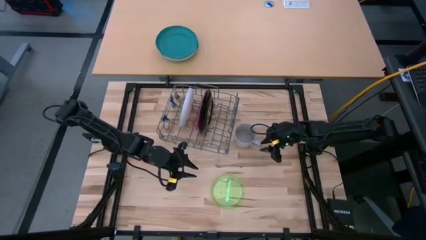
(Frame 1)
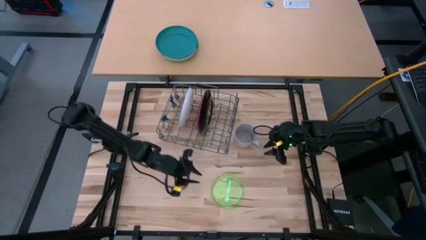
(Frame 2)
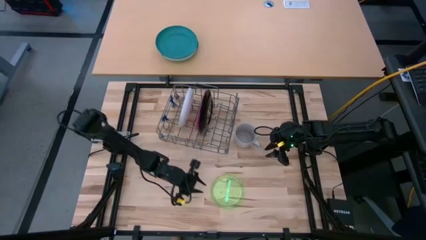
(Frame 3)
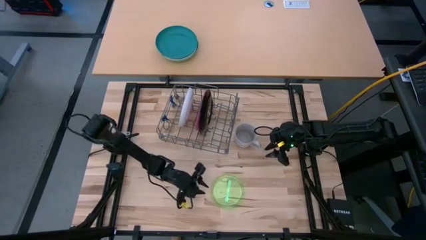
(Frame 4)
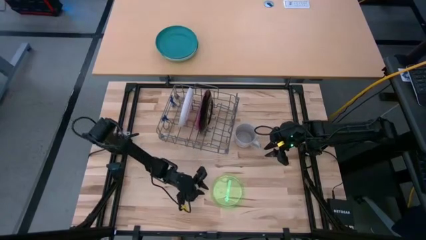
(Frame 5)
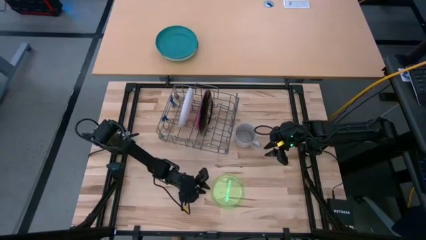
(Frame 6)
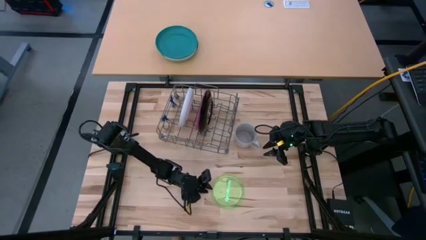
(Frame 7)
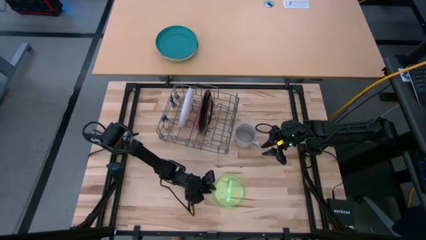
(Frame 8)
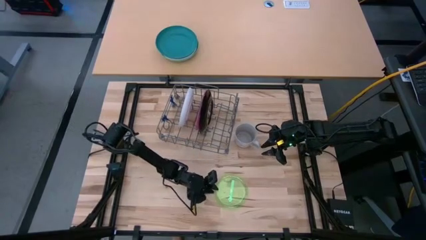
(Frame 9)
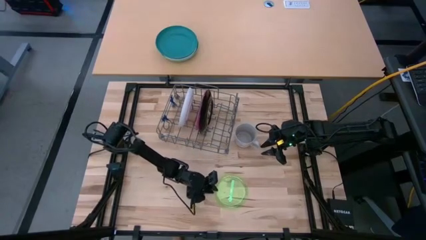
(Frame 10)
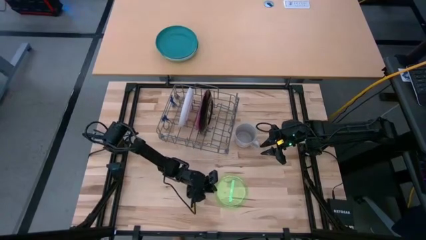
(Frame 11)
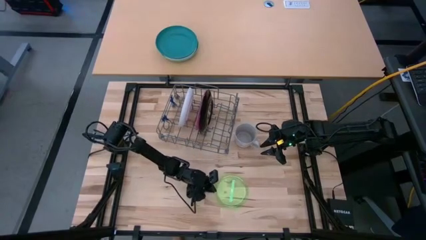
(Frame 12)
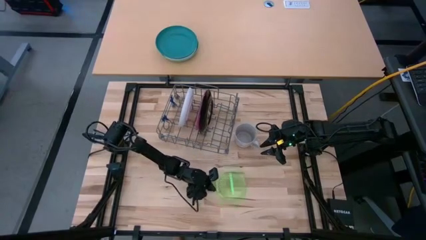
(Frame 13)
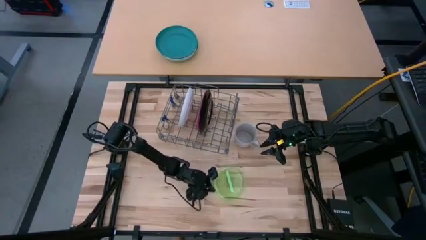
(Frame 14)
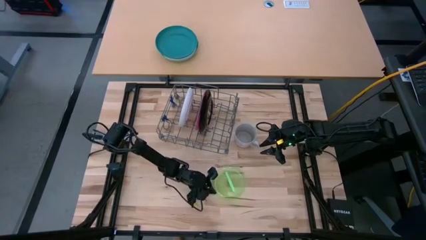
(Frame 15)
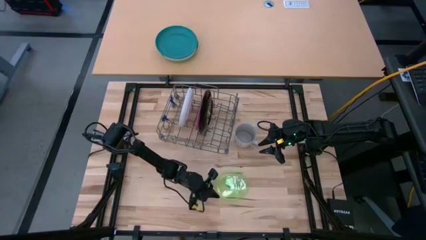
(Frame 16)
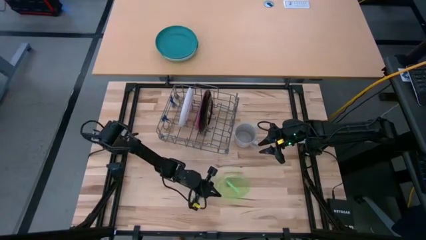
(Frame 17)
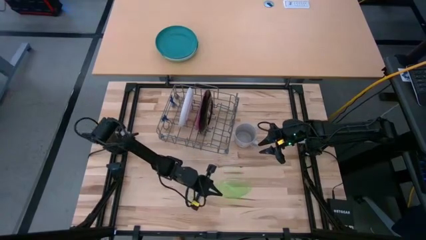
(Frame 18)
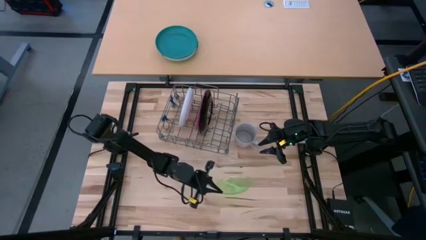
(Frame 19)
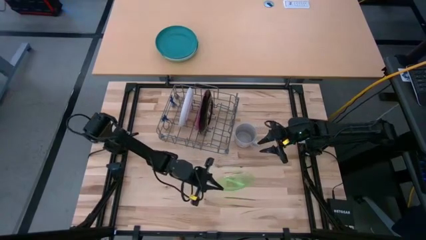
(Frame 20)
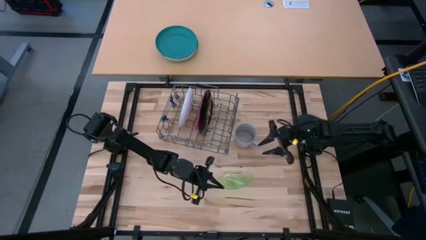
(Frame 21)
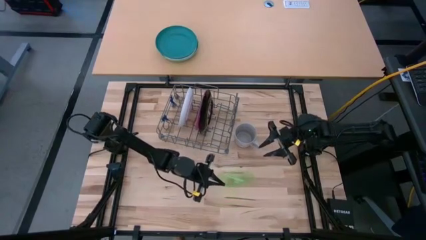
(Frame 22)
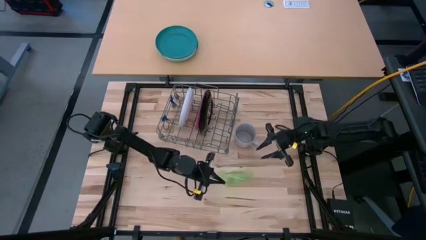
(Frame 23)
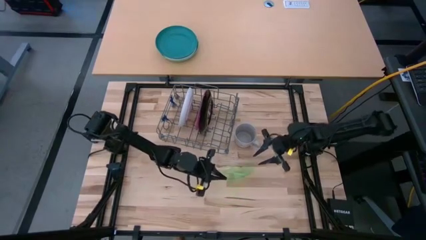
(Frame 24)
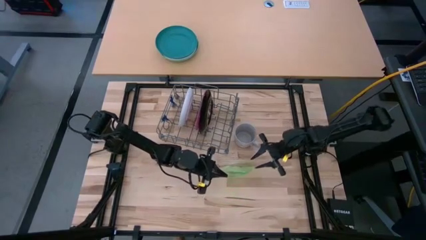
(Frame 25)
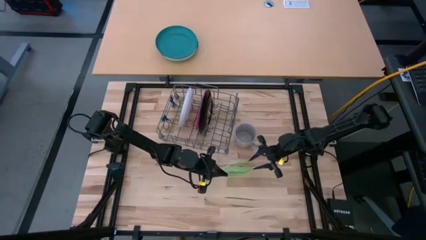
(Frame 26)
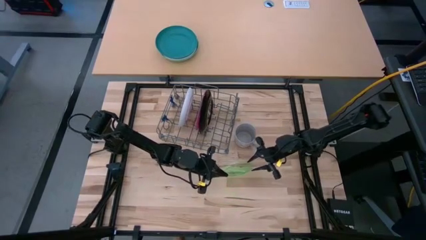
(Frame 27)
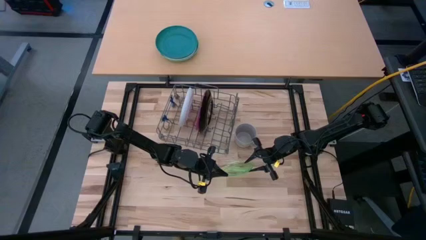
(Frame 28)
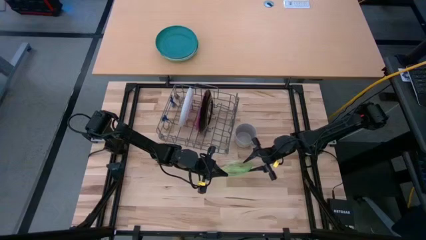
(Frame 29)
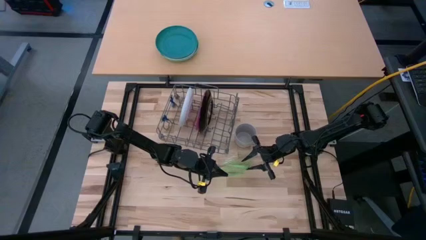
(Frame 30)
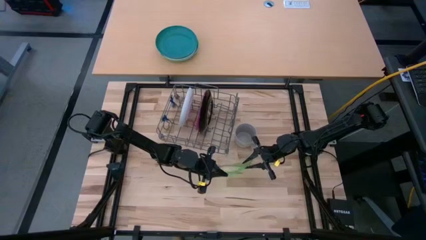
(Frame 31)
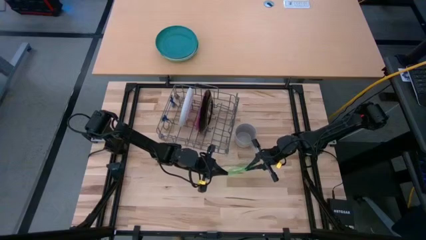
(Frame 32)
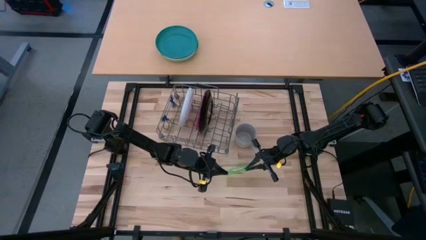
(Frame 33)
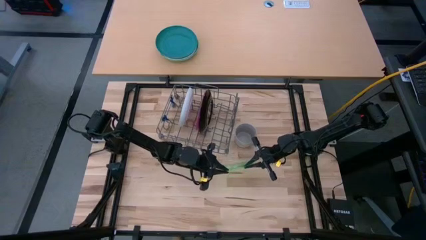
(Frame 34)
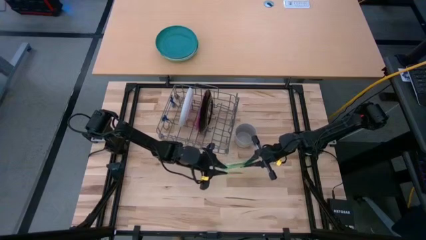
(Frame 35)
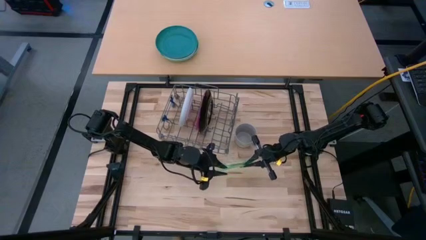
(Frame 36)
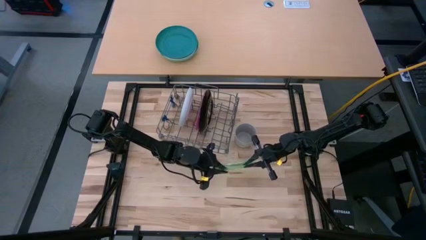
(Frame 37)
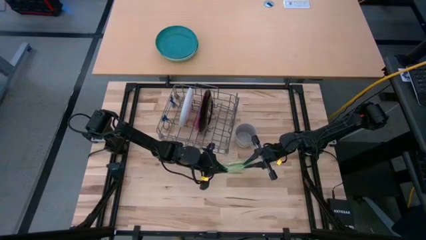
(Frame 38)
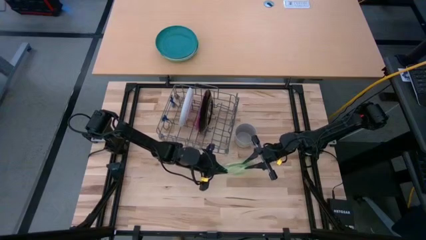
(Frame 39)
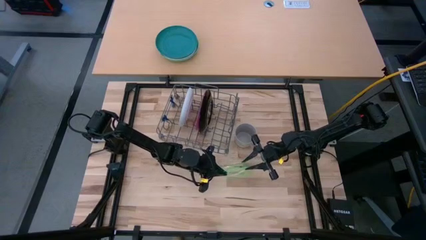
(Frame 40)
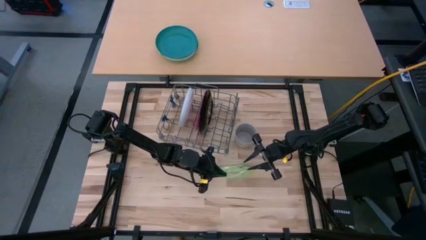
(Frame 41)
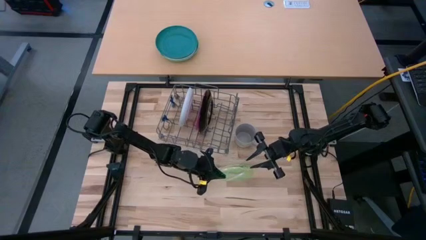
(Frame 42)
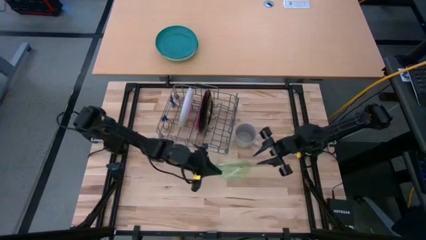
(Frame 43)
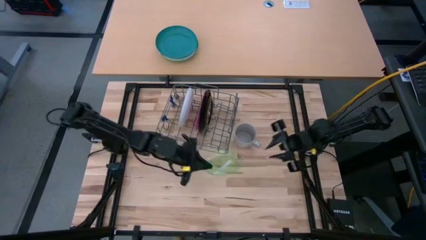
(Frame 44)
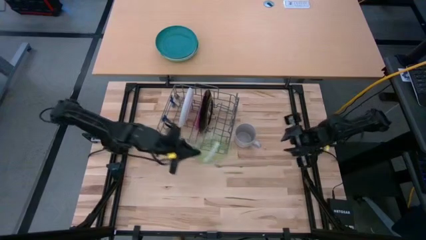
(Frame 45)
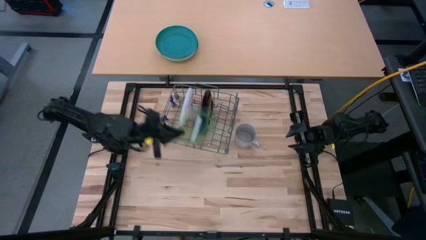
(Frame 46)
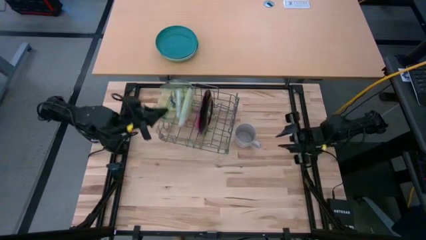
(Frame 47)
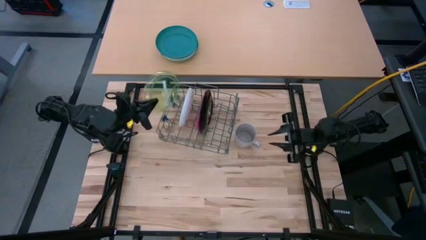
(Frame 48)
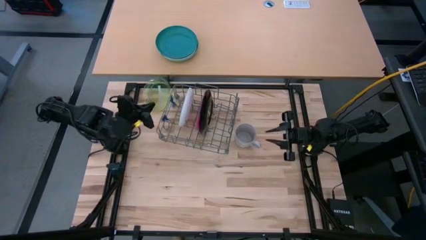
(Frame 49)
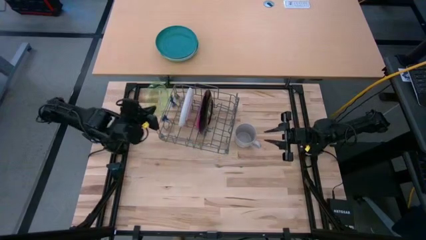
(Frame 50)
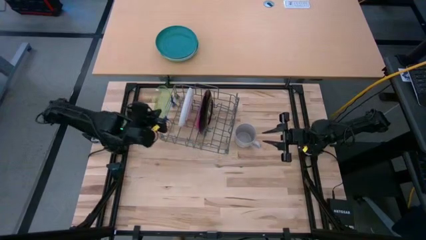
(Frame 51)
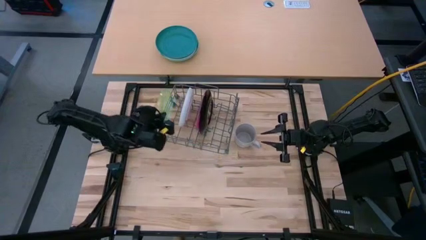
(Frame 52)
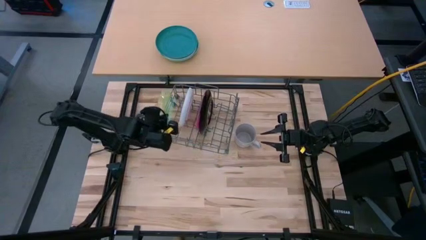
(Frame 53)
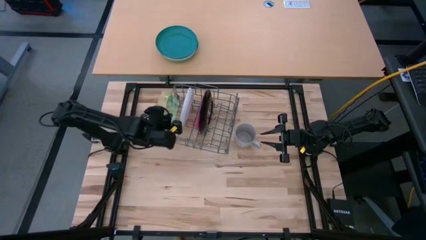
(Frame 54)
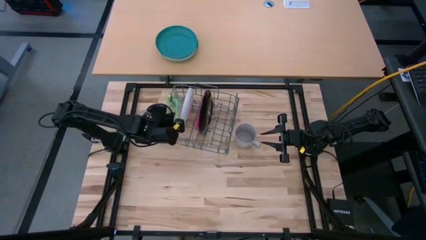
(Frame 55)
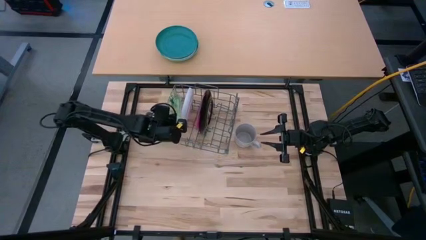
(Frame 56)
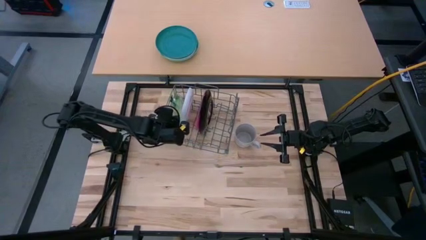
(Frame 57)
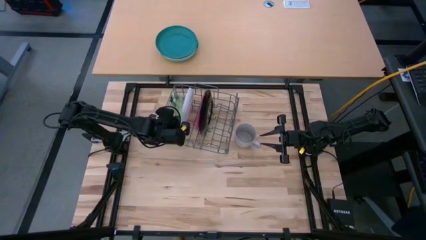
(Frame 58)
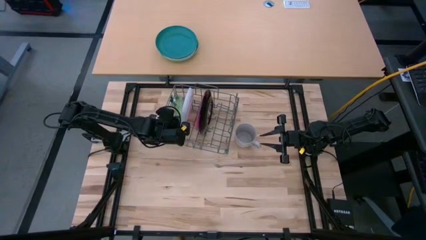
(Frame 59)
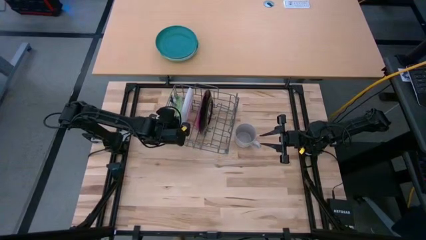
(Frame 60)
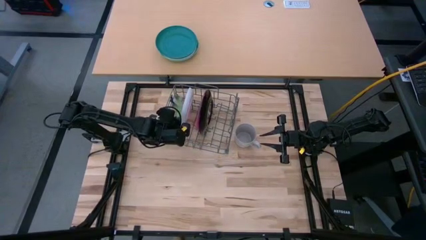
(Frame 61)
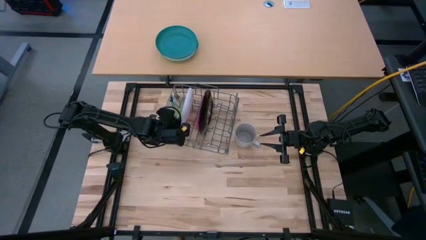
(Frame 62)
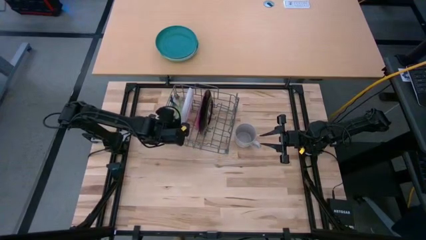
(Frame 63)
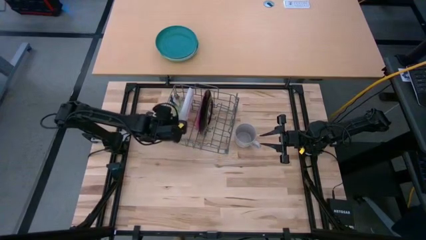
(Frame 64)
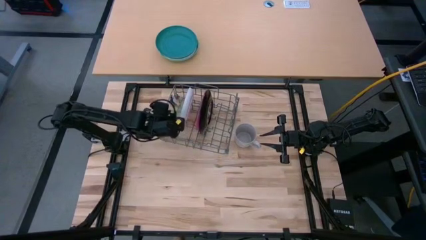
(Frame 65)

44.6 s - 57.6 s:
Task: Sort dishes
Put the green plate in the dish rack

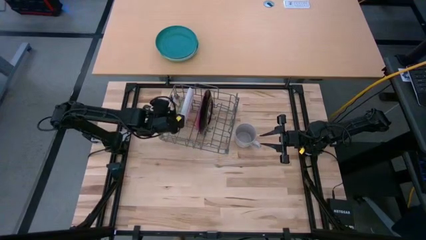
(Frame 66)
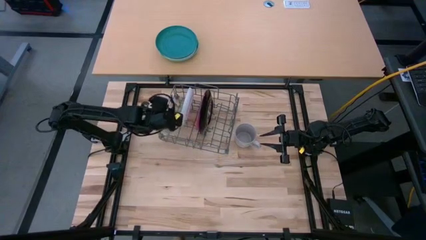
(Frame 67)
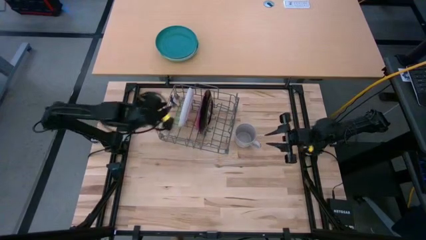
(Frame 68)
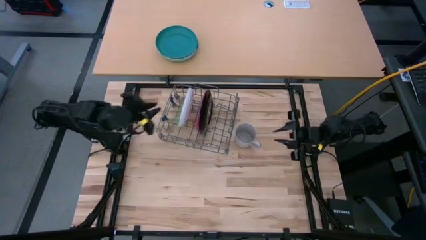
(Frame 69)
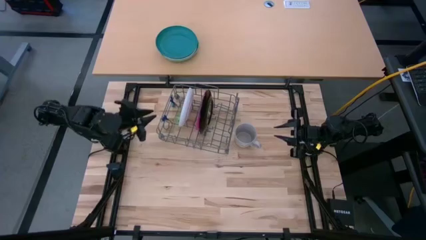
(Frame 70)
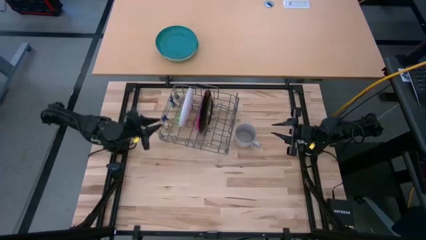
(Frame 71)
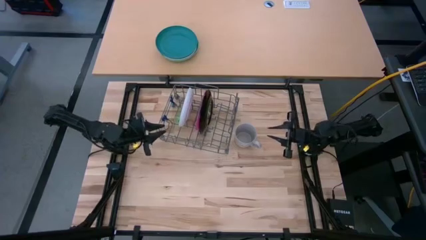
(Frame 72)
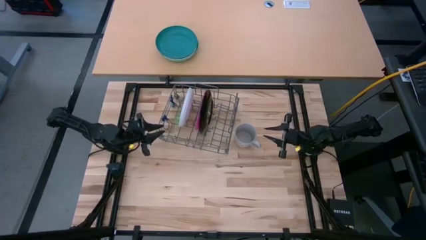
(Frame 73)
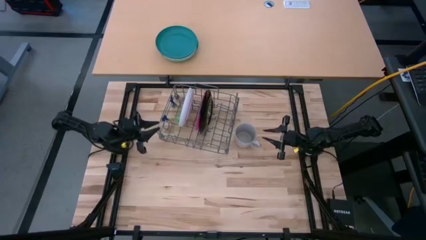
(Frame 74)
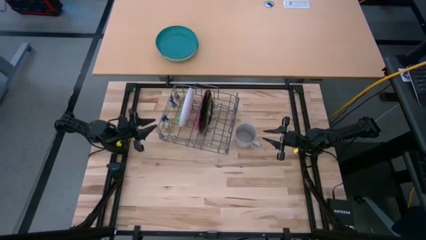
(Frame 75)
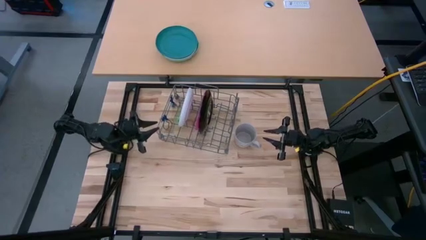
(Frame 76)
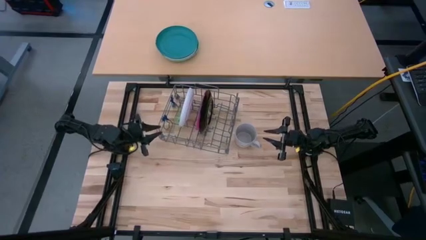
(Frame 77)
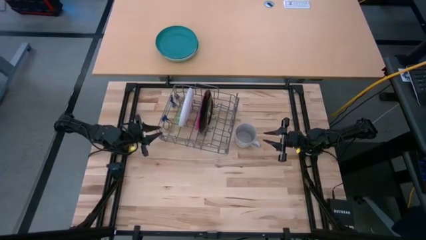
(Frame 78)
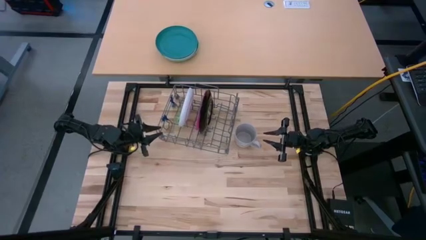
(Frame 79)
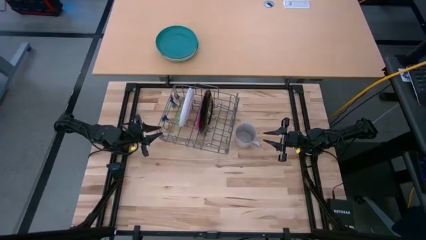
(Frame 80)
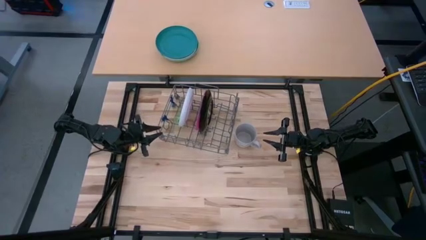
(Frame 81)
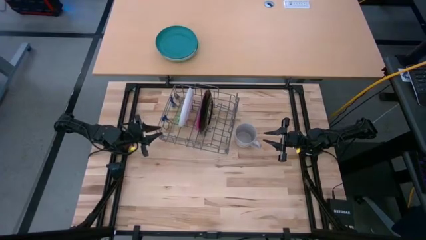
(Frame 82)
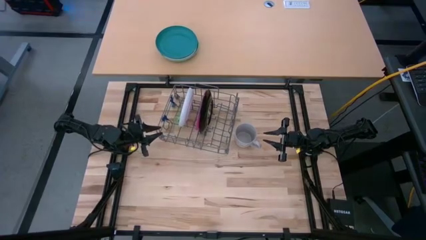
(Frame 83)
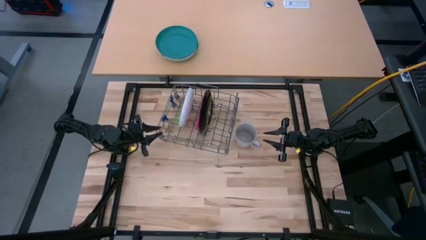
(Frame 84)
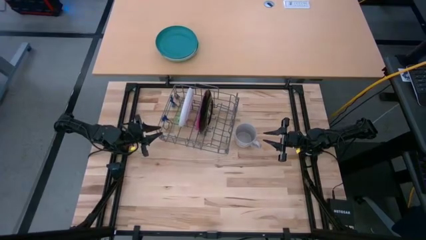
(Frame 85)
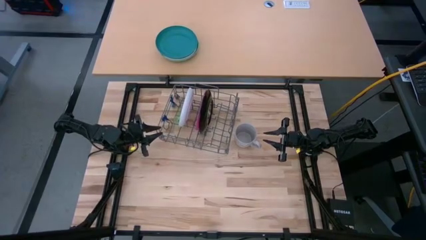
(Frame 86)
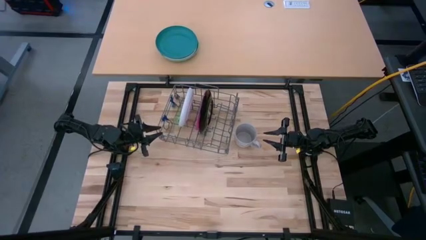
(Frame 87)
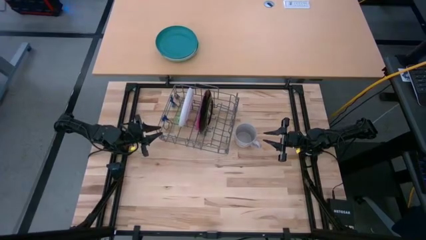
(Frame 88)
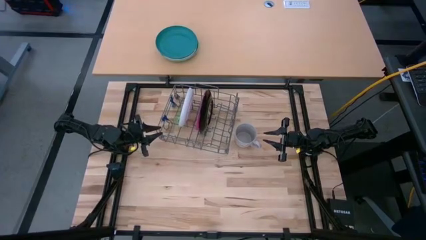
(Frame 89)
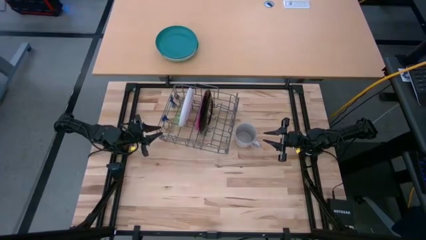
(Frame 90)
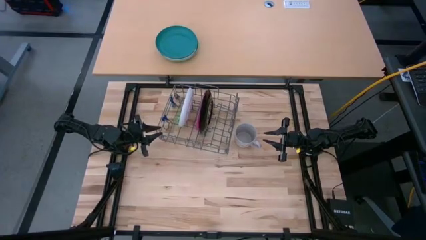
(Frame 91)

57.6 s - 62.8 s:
Return to Home Position
